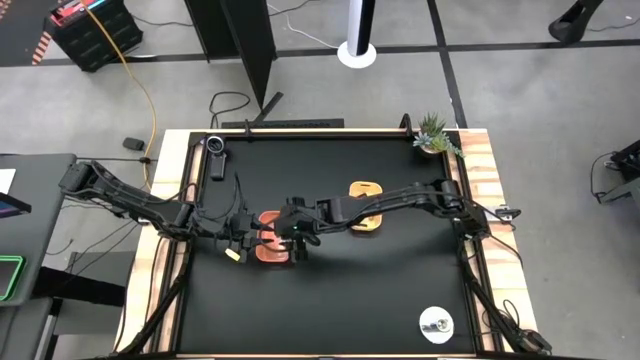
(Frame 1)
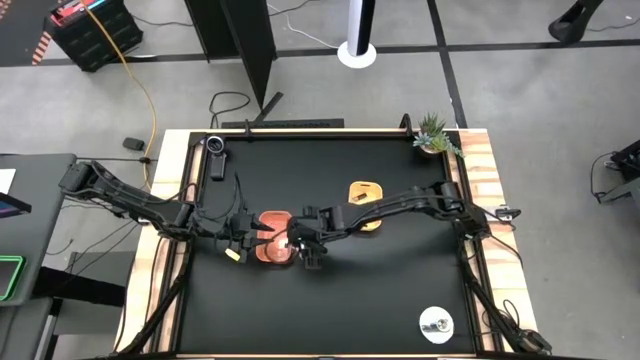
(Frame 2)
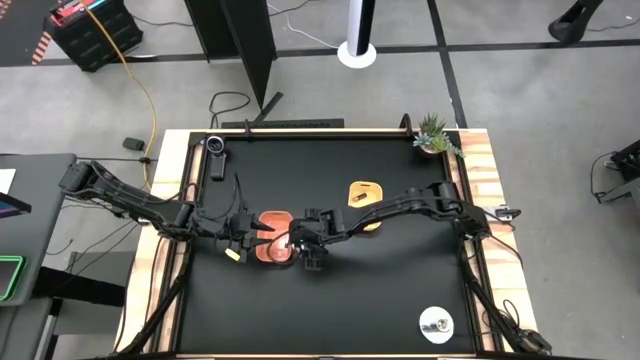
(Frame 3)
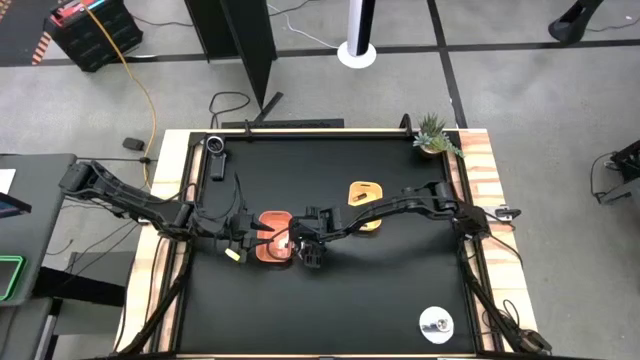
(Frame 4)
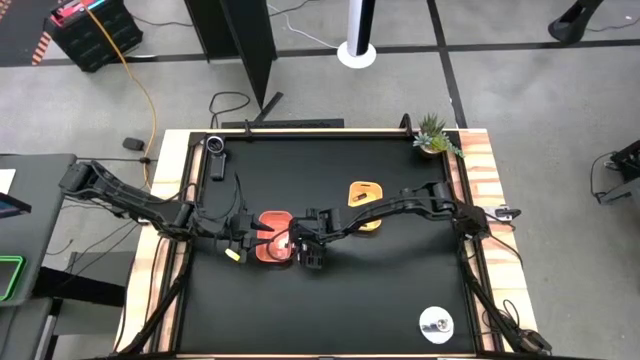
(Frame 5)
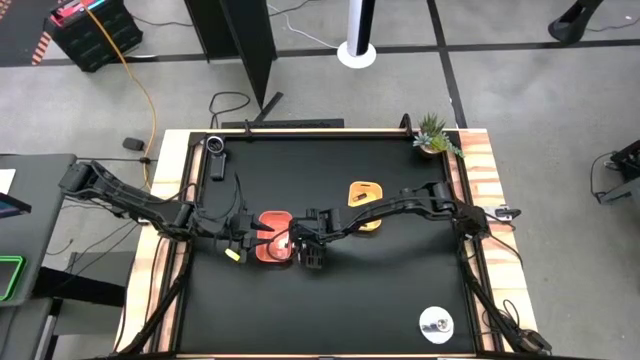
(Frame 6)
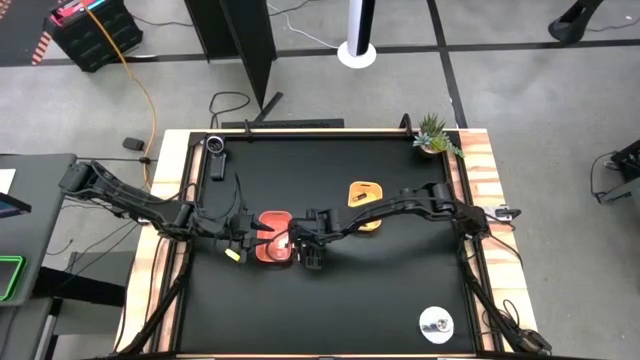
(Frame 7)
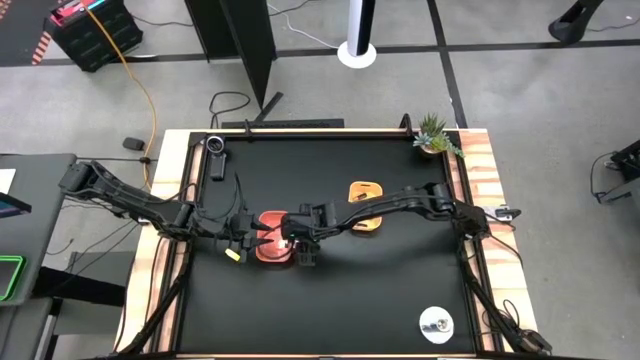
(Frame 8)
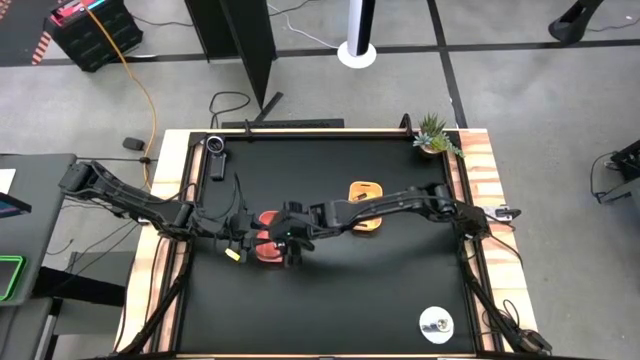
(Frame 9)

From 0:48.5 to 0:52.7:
Task: Sort batteries
Put the big silver battery into the orange bin

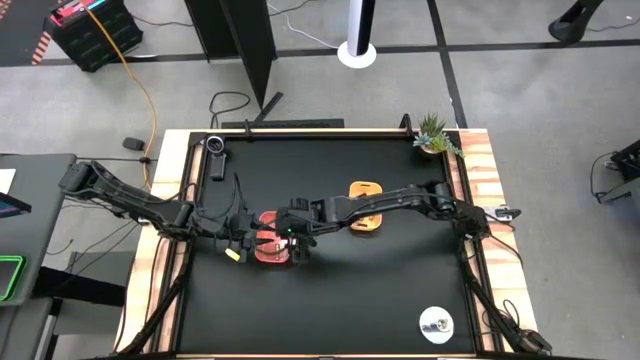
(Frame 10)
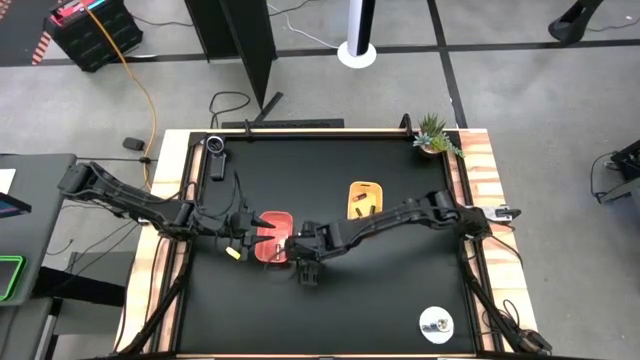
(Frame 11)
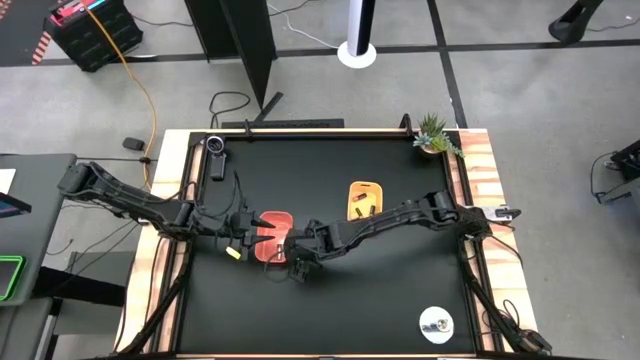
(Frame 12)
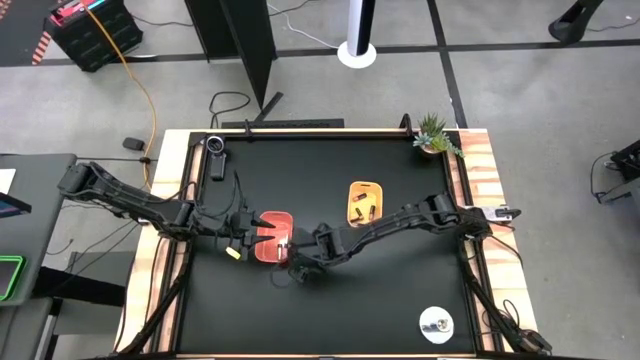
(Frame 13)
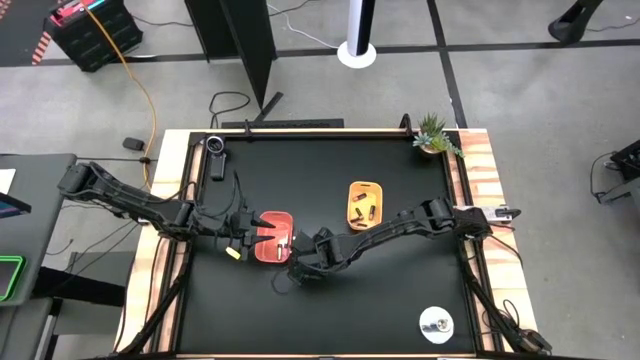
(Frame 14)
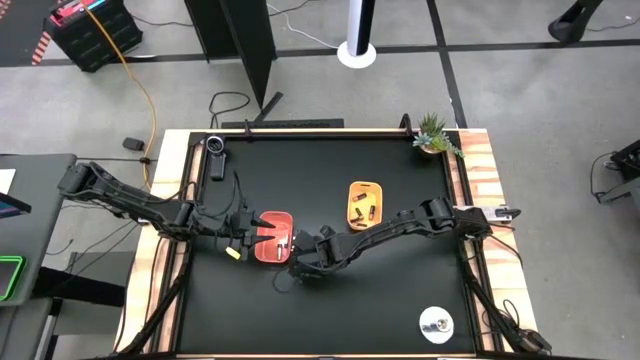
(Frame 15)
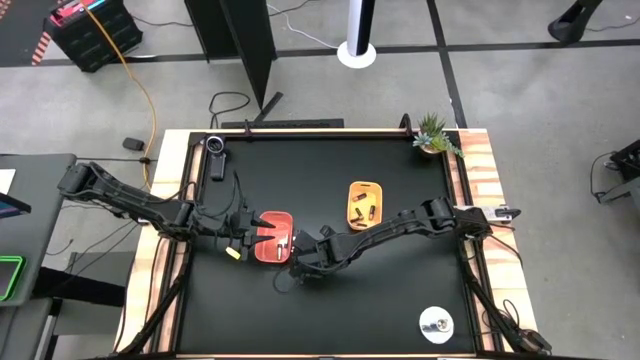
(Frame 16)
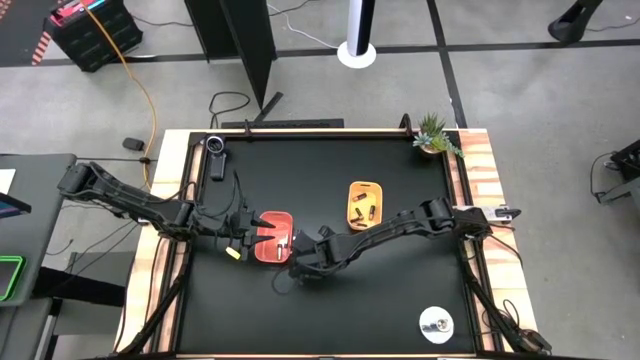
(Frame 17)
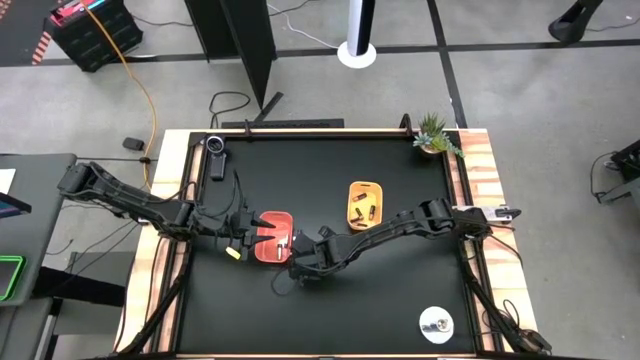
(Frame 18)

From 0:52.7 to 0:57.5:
Put the small silver battery into the orange bin

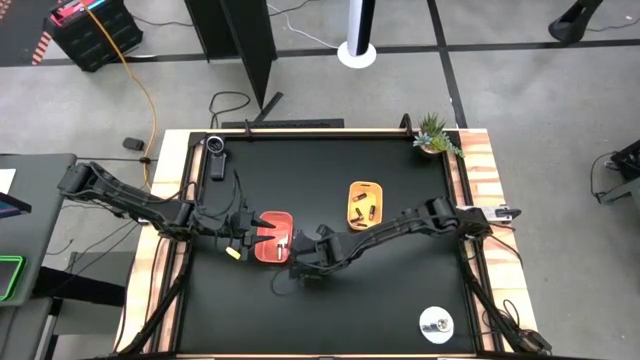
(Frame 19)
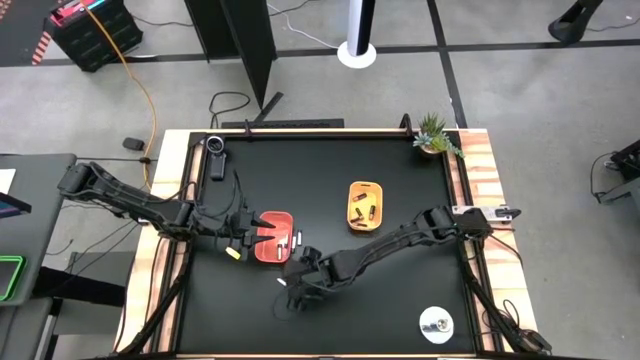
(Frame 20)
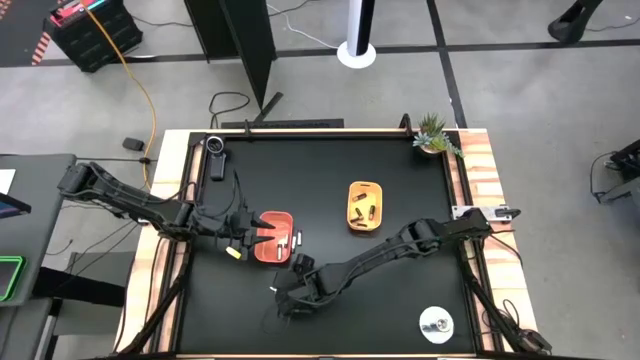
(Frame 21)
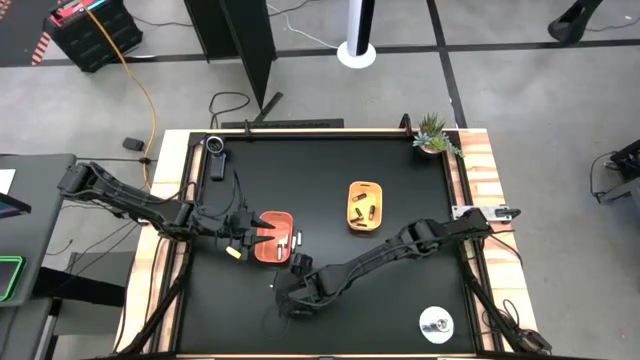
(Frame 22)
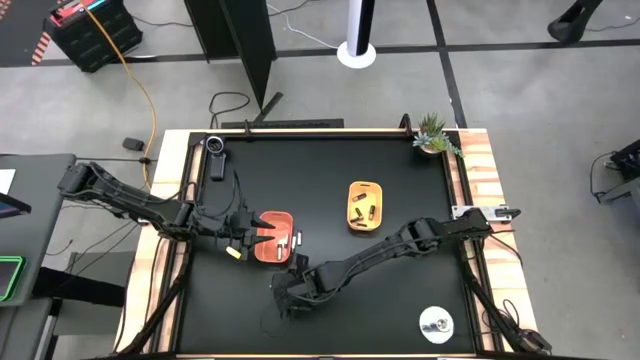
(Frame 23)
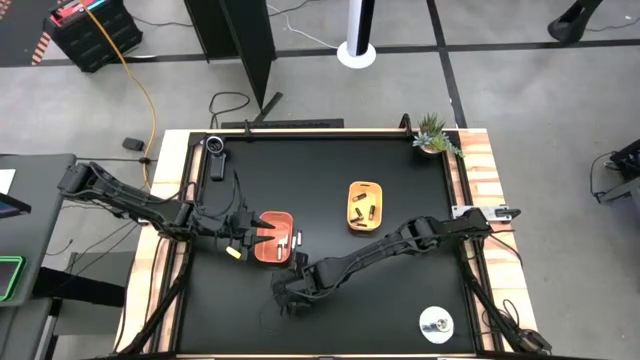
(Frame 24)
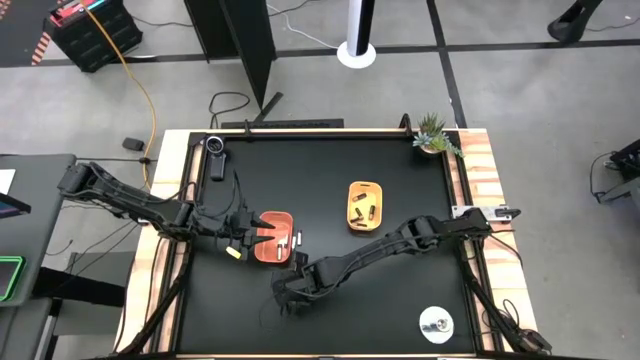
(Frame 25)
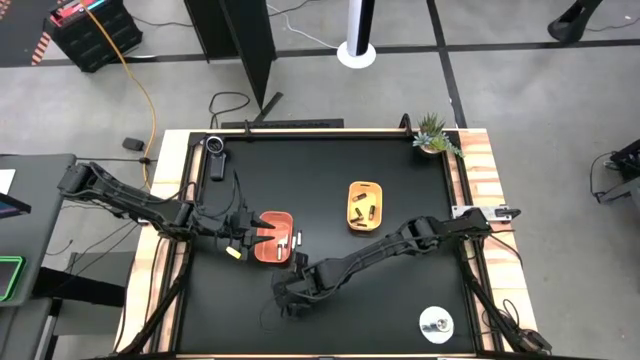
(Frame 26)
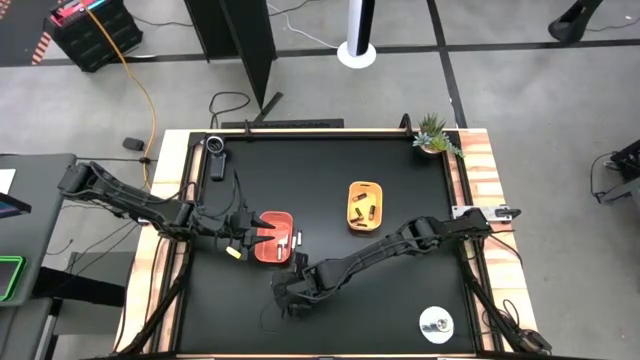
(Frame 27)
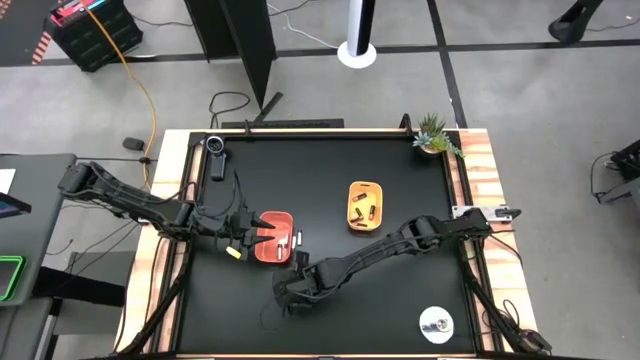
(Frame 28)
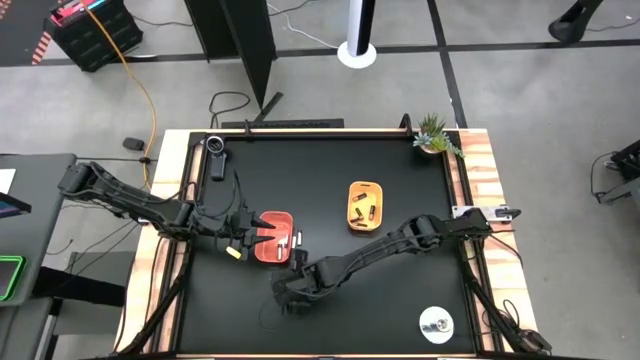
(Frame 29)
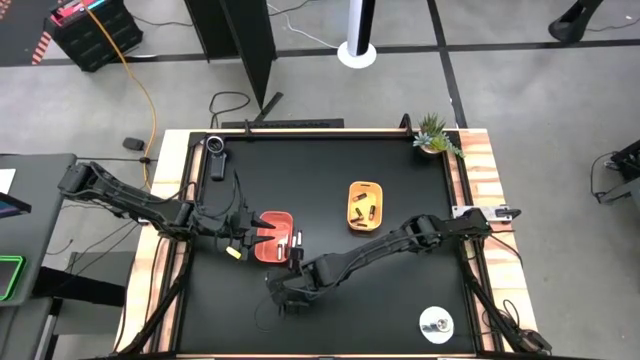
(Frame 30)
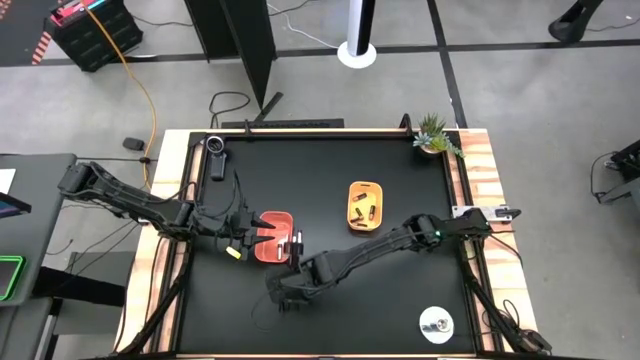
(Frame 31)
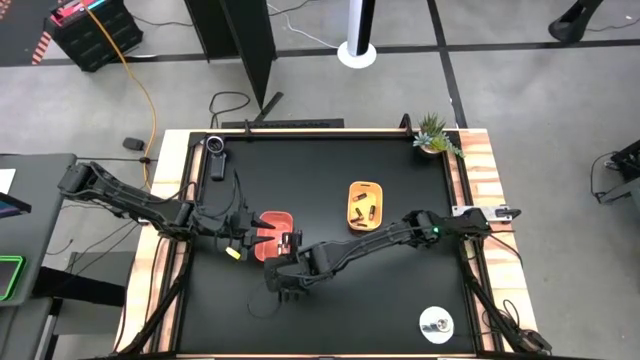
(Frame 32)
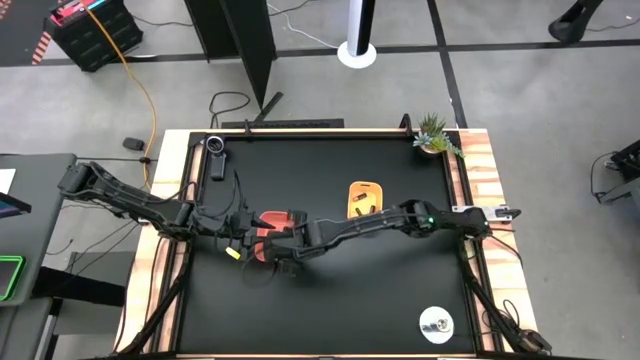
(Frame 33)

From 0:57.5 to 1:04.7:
Put the small silver battery into the orange bin

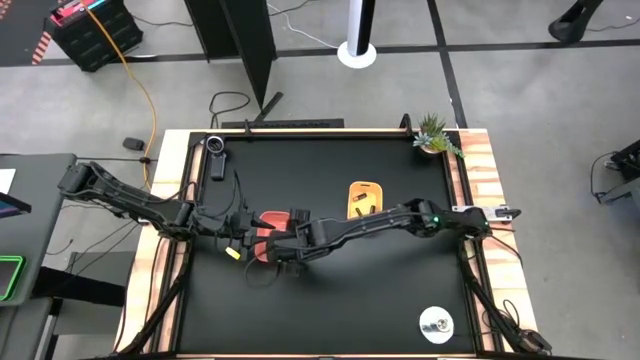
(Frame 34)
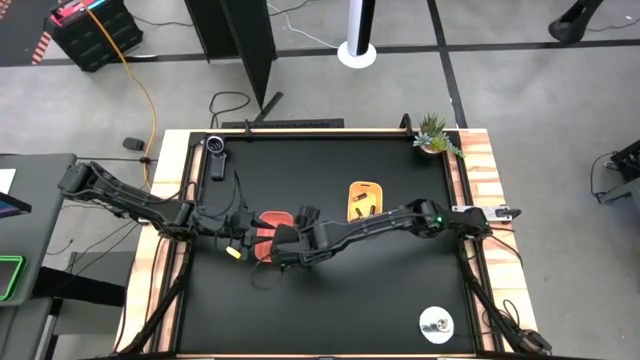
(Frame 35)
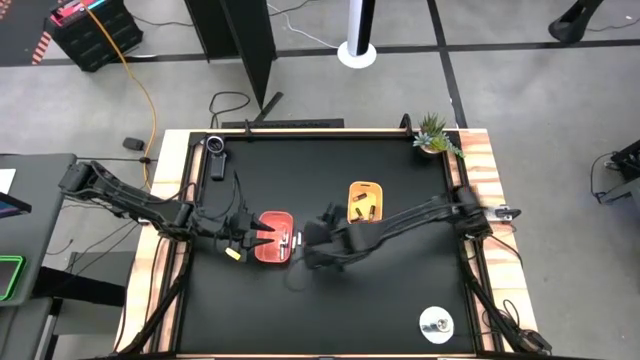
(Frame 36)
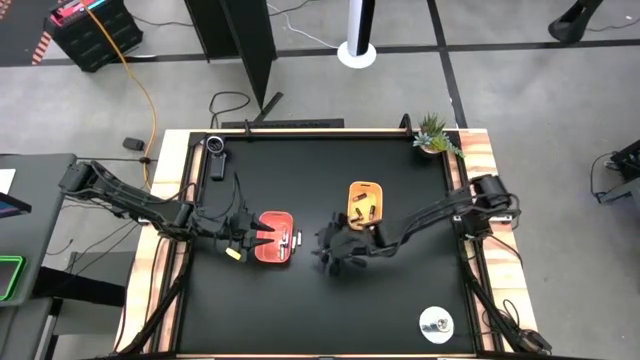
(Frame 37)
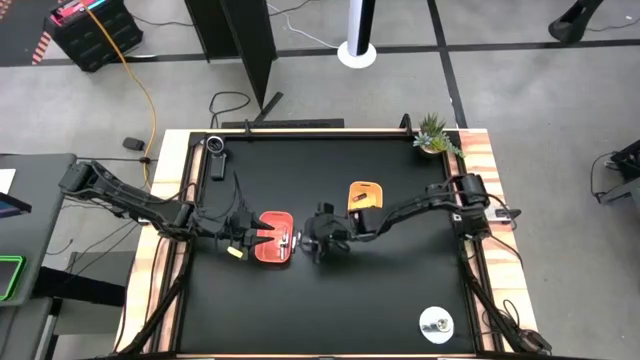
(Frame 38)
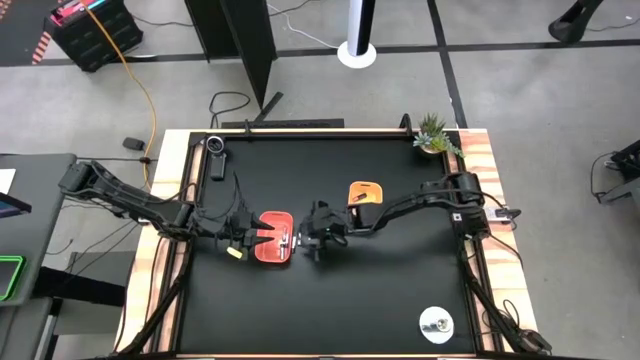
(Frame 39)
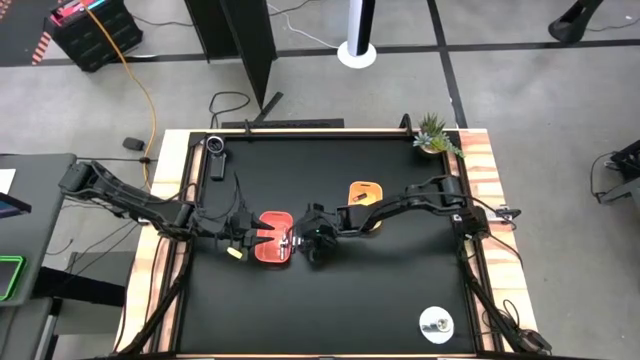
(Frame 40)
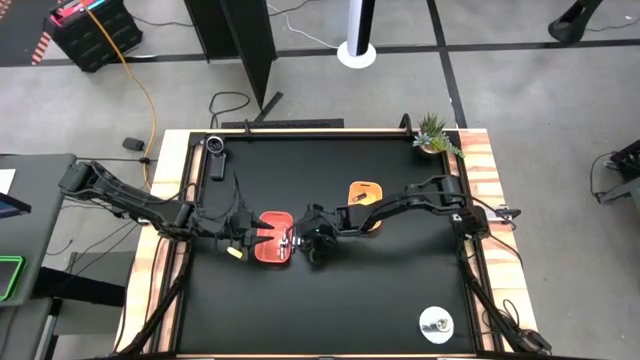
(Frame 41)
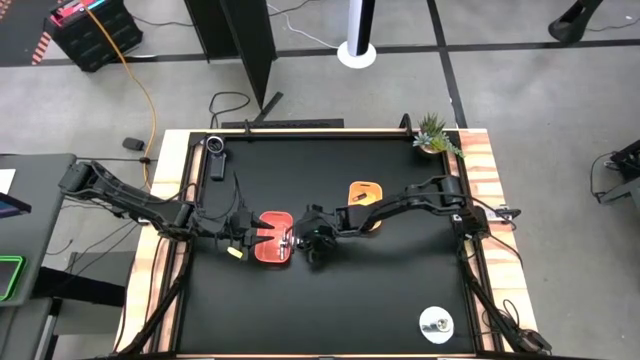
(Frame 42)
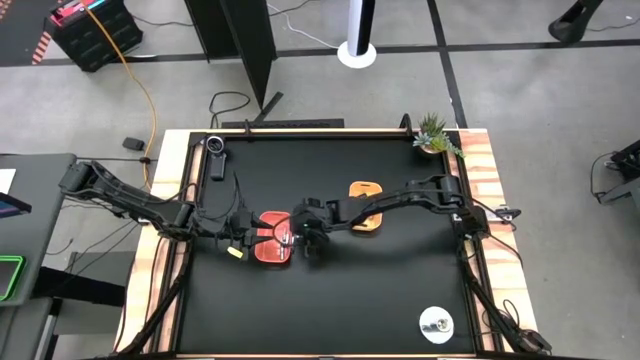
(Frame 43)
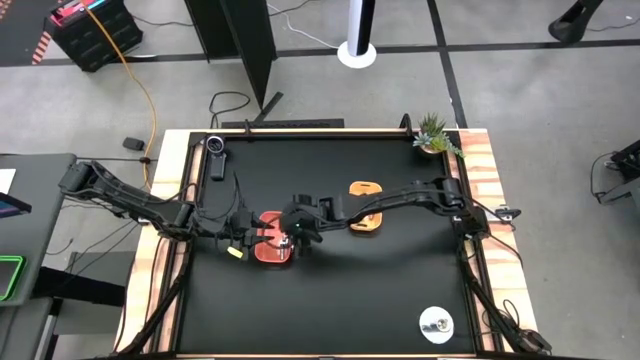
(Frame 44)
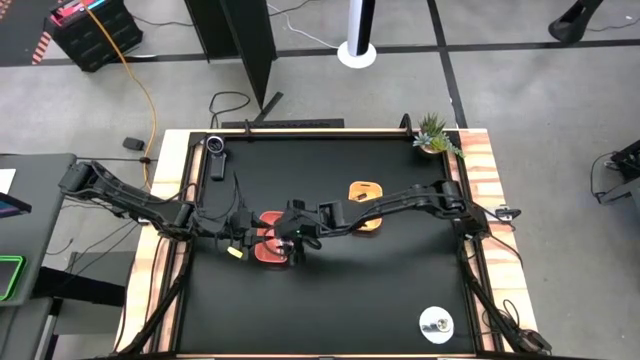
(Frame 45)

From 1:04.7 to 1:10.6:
Put the big silver battery into the orange bin
